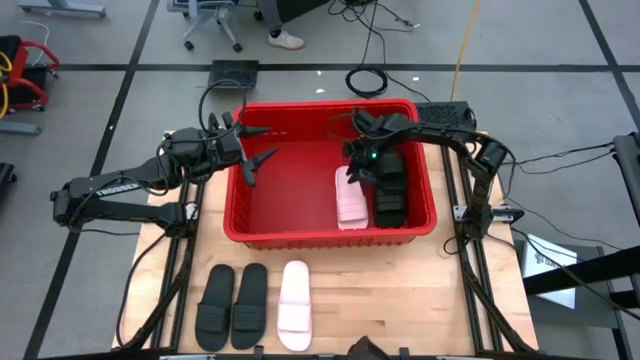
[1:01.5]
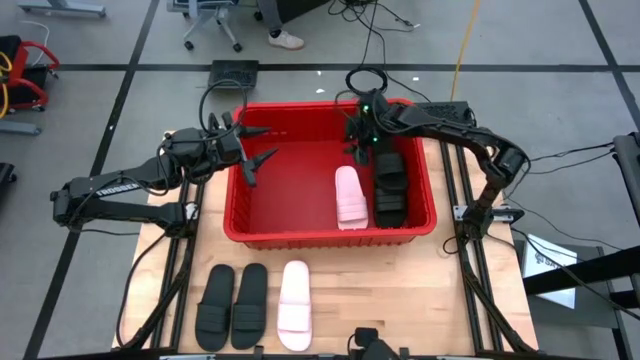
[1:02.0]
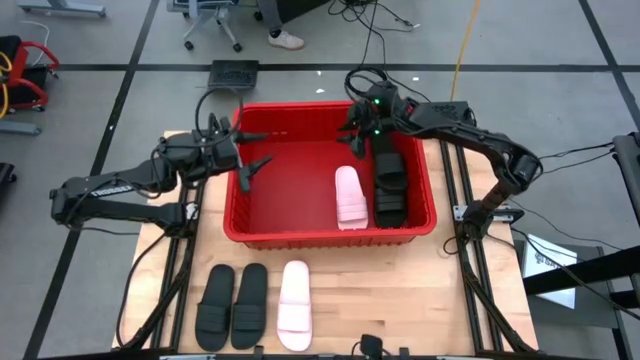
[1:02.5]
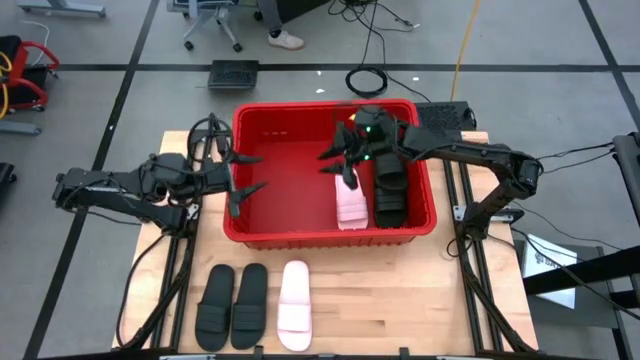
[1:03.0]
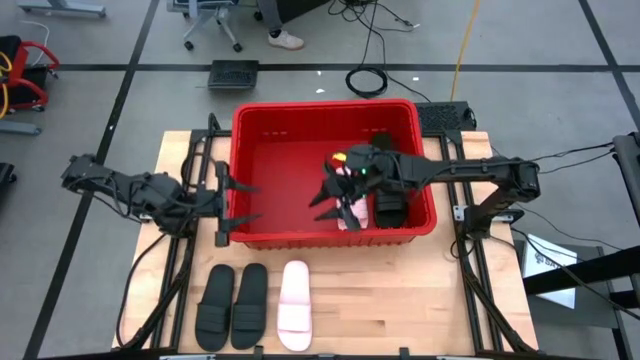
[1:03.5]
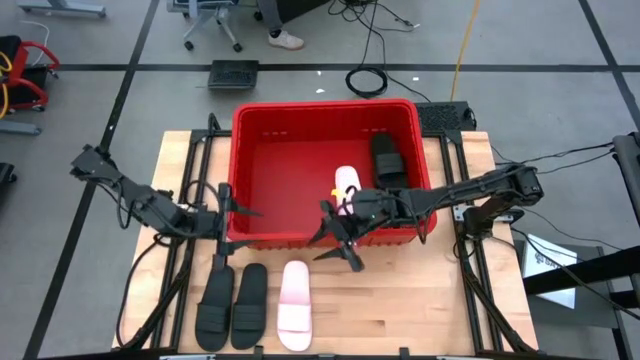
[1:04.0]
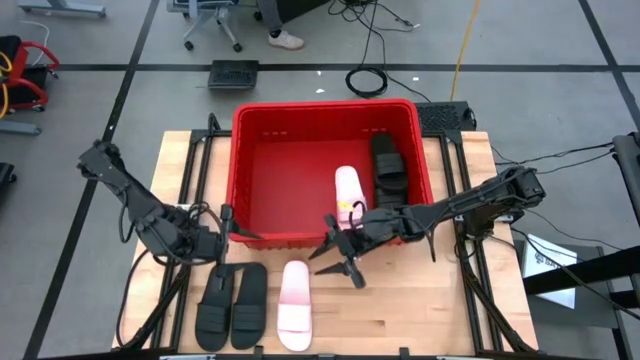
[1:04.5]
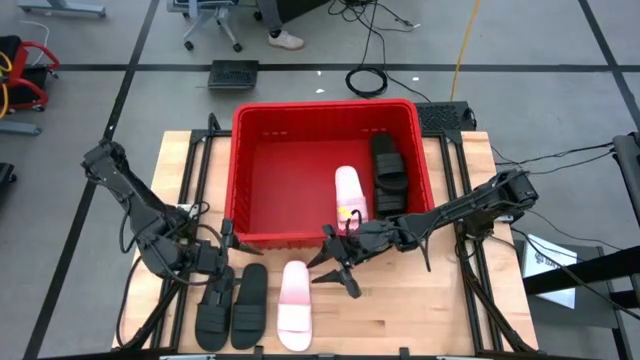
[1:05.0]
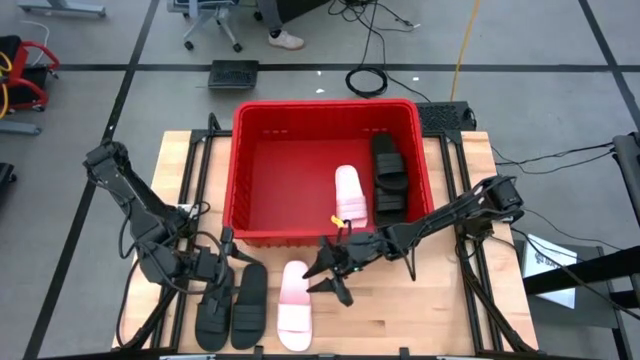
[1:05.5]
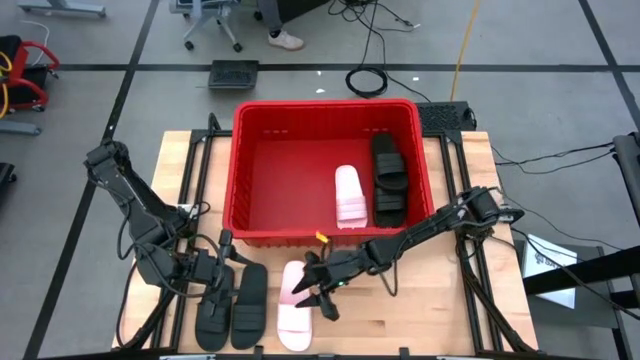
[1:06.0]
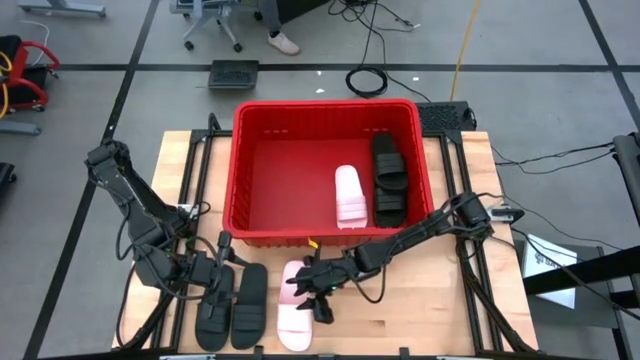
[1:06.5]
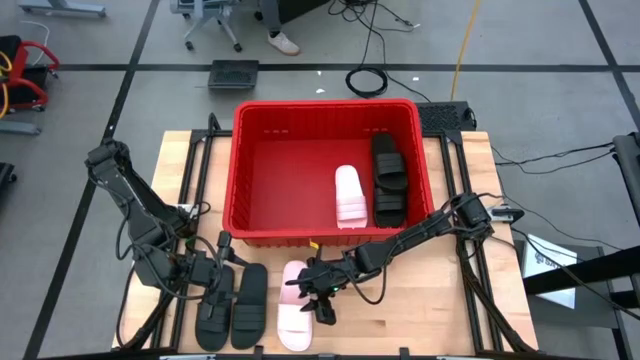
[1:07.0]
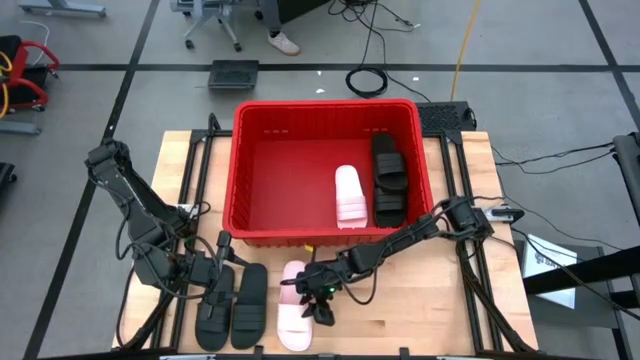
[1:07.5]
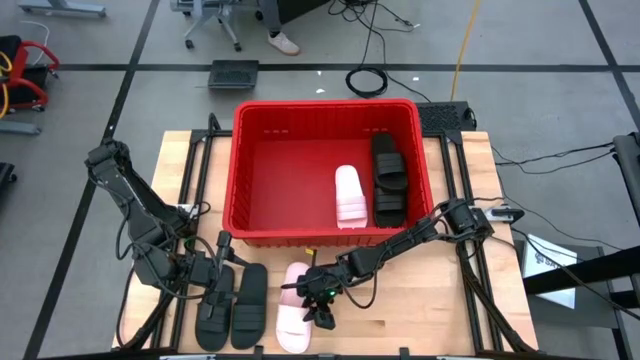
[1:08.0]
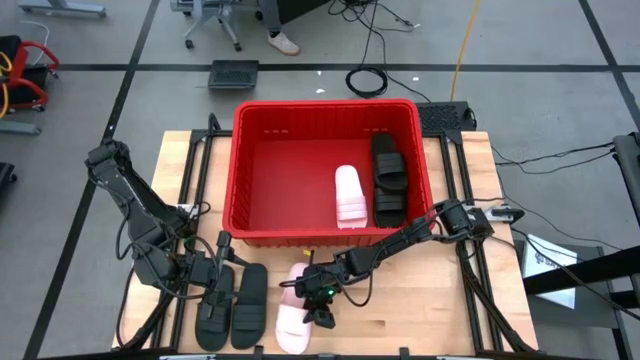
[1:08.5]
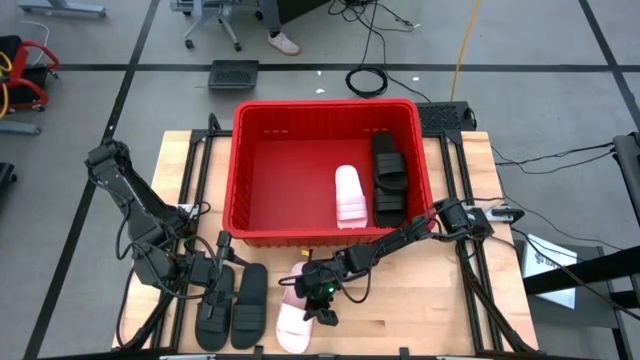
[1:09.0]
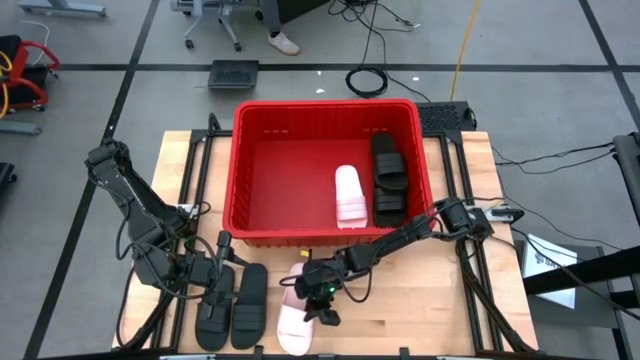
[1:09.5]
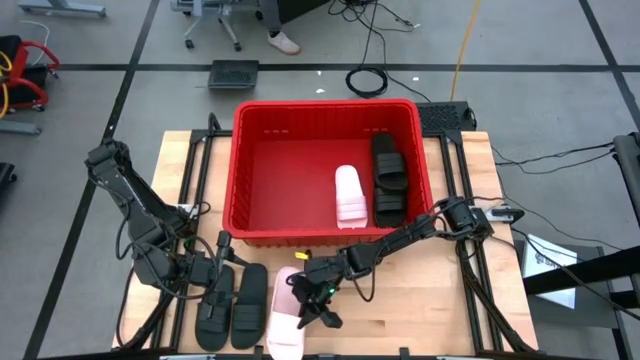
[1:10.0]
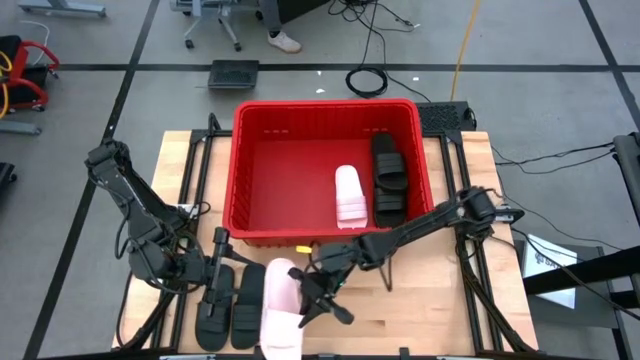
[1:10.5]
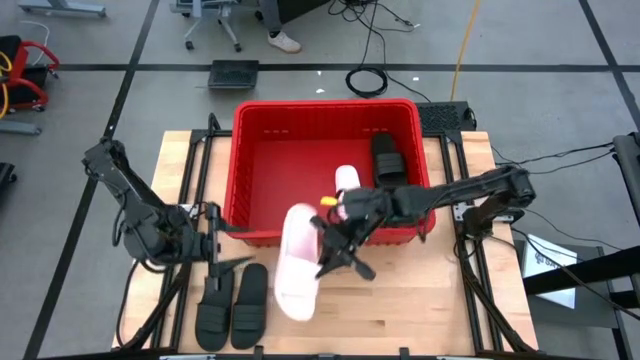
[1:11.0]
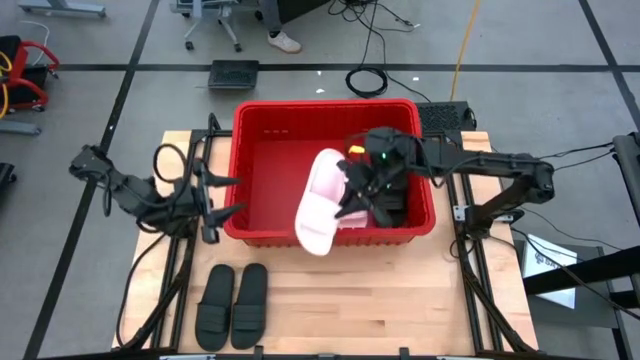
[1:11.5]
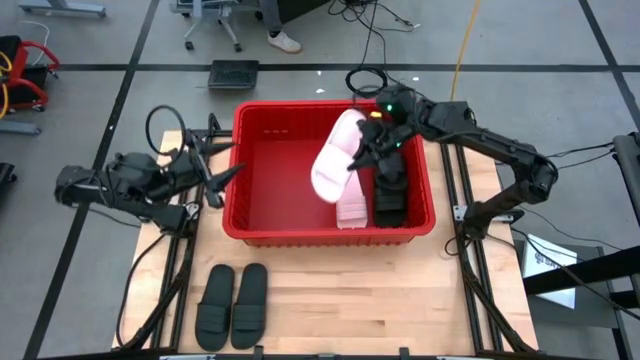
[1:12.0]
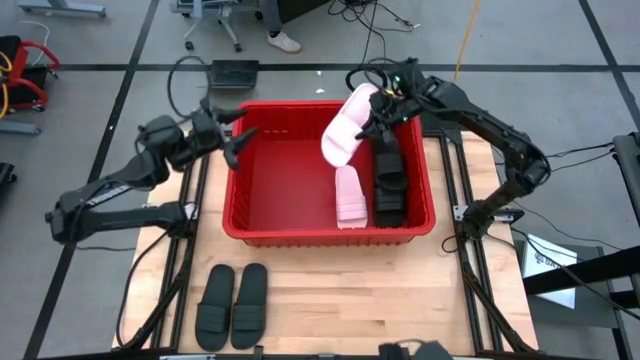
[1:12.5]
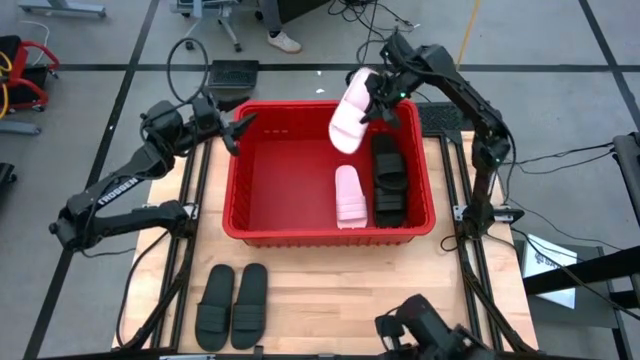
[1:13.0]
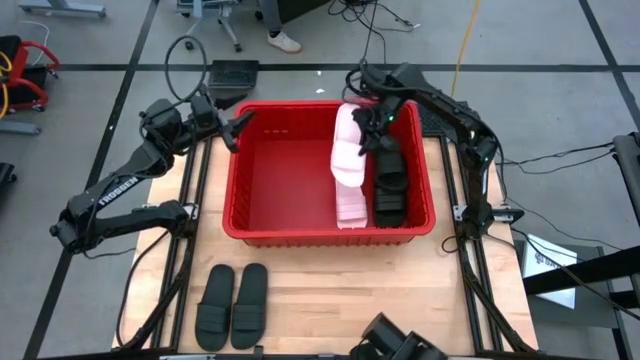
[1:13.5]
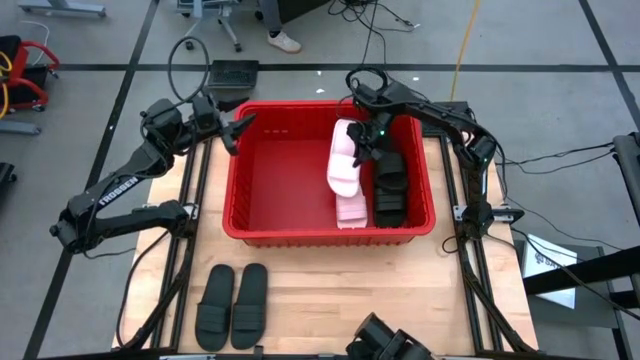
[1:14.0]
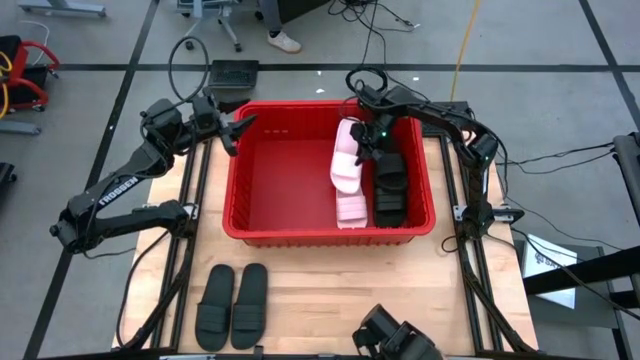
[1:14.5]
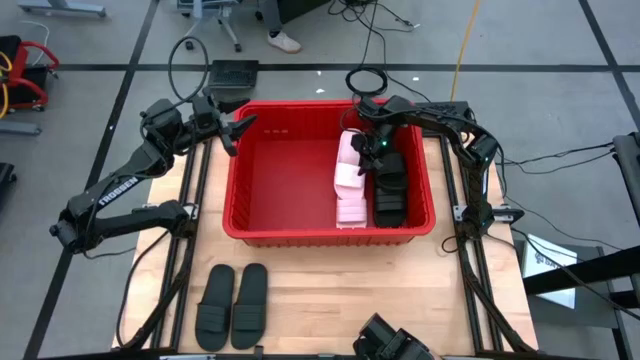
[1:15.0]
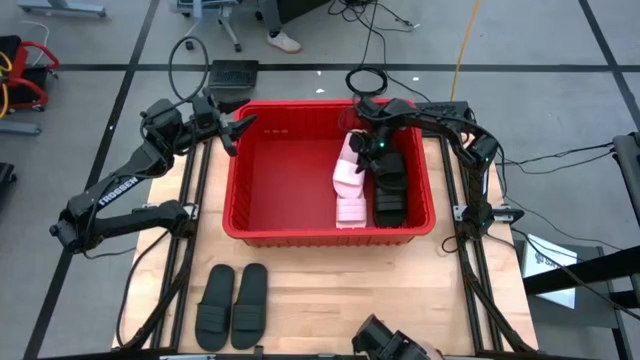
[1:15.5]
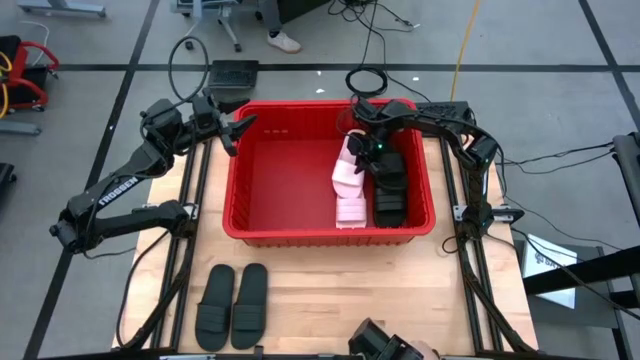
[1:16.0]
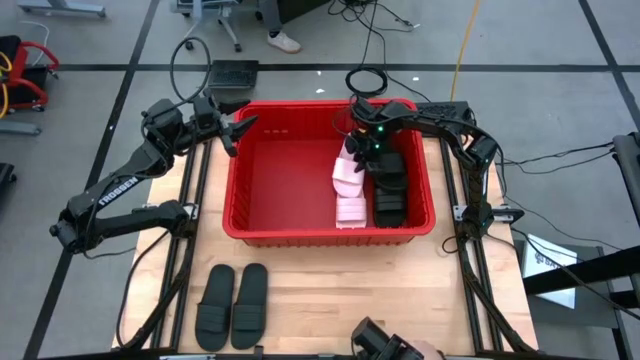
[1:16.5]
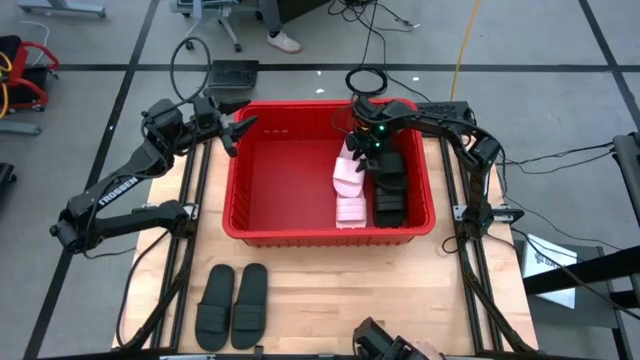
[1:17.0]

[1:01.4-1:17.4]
Task: Pick and place slides into bin
Put the pink slide into the red container

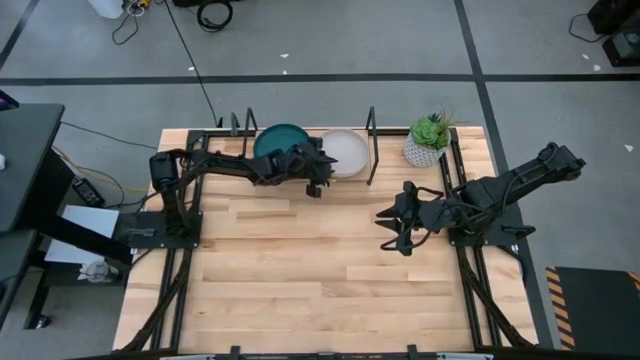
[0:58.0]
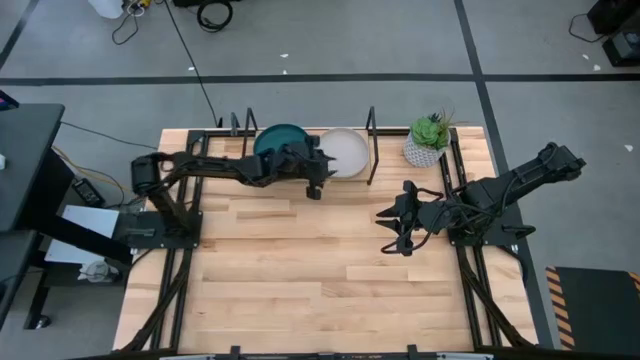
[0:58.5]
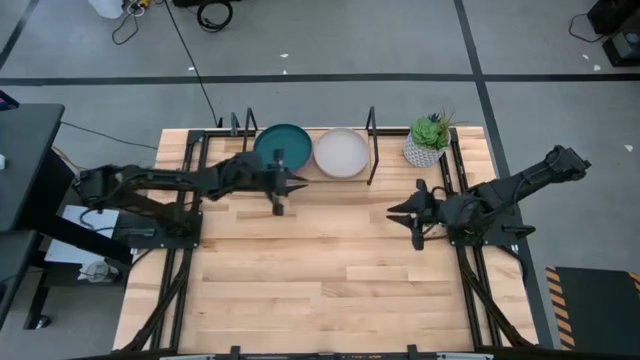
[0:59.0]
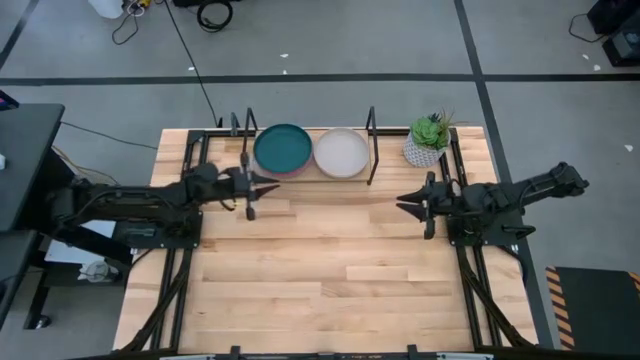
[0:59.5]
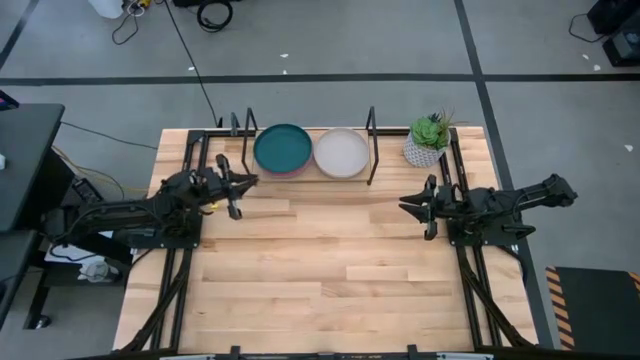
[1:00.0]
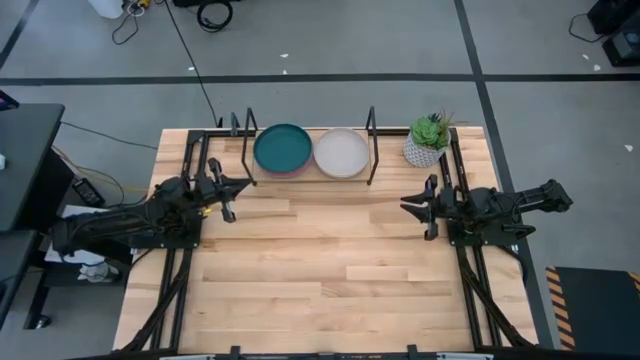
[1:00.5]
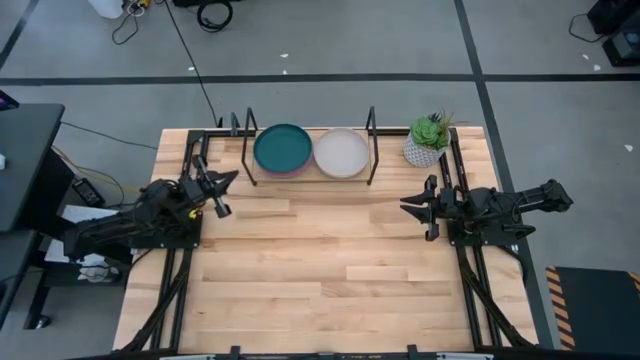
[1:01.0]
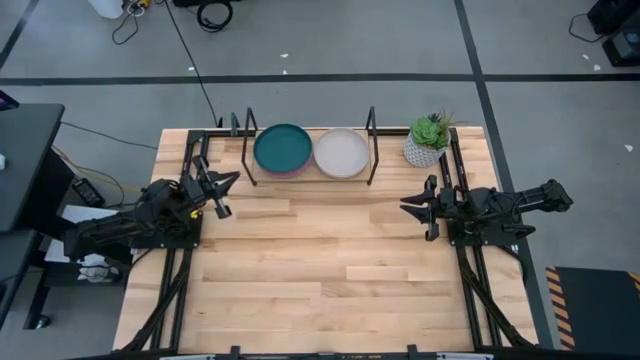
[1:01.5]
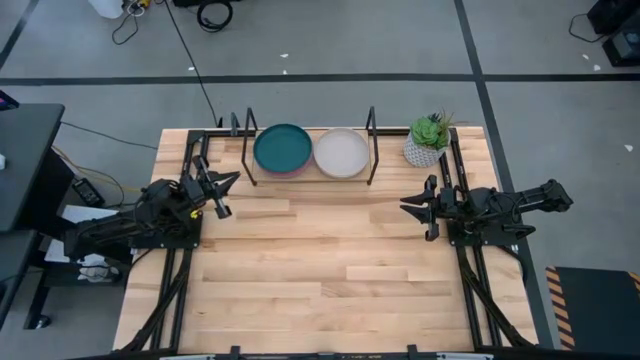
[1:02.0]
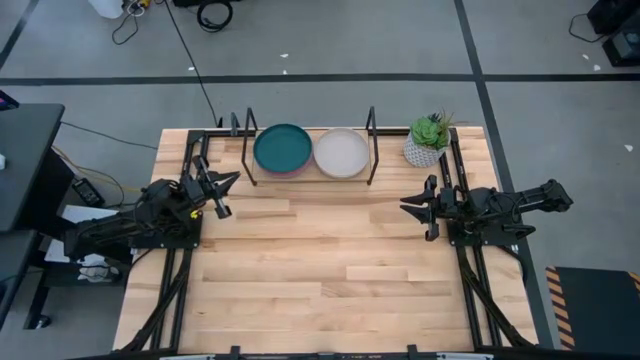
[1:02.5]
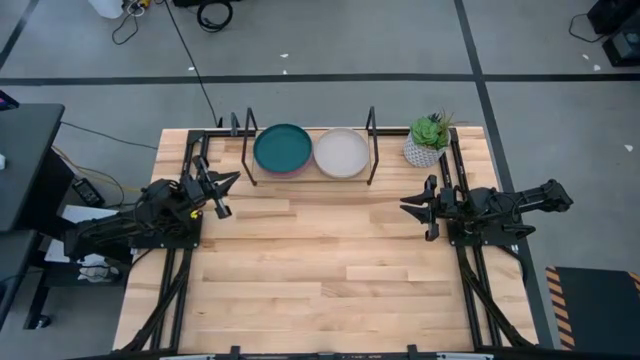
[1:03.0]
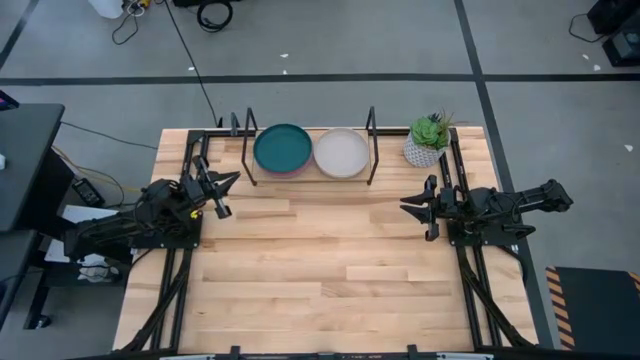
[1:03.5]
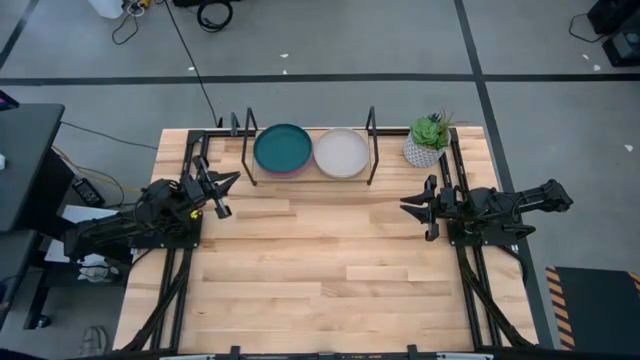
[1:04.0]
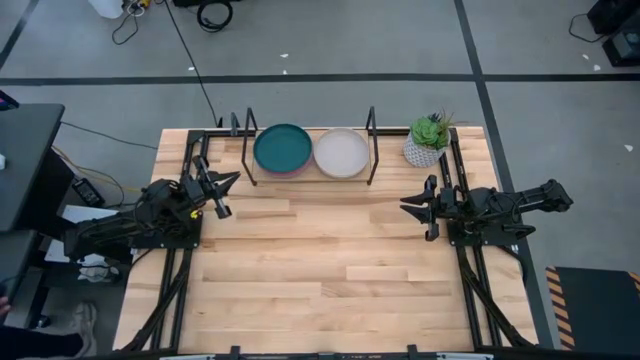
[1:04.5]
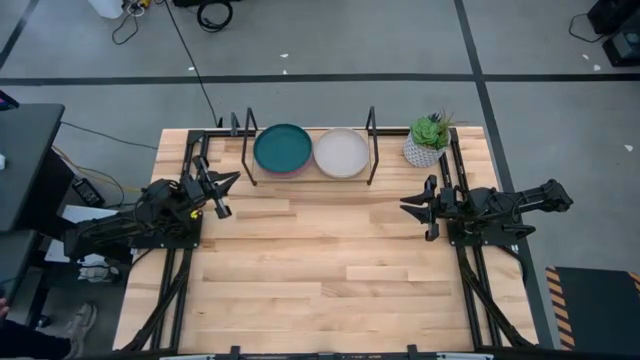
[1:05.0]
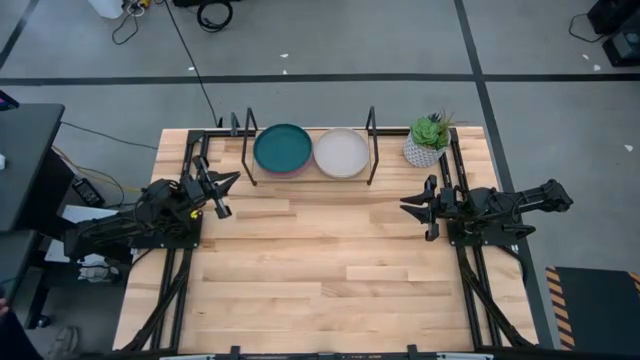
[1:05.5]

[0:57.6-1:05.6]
Task: Place and stack plates onto a shelf
Return to Home Position
